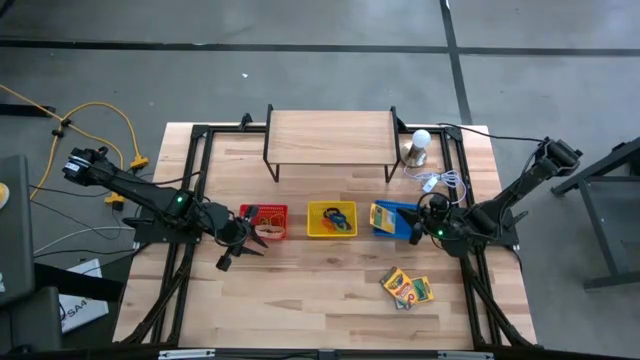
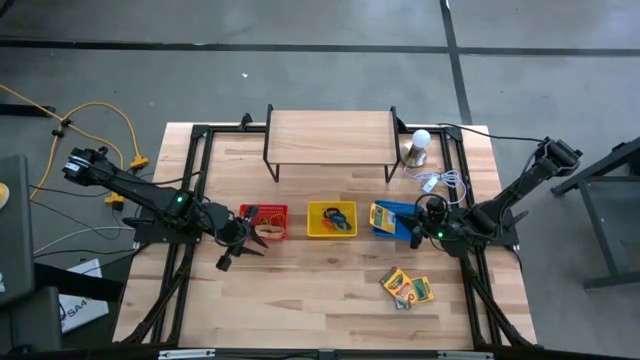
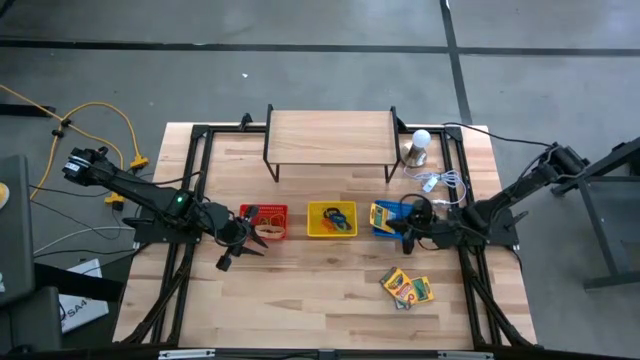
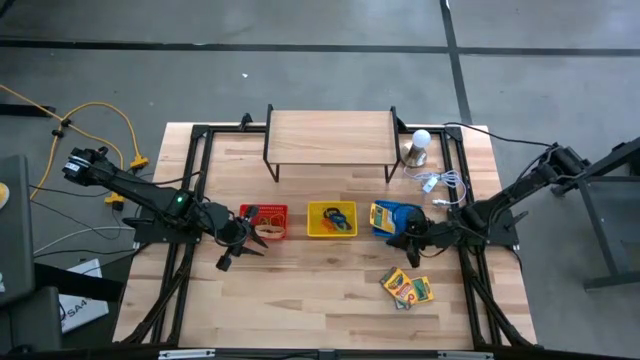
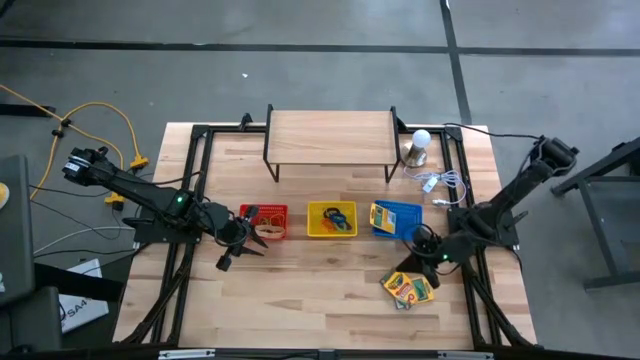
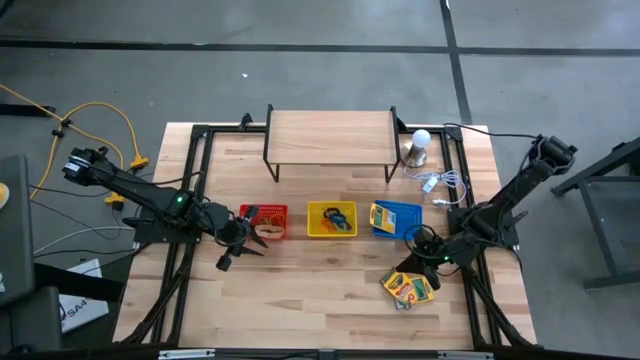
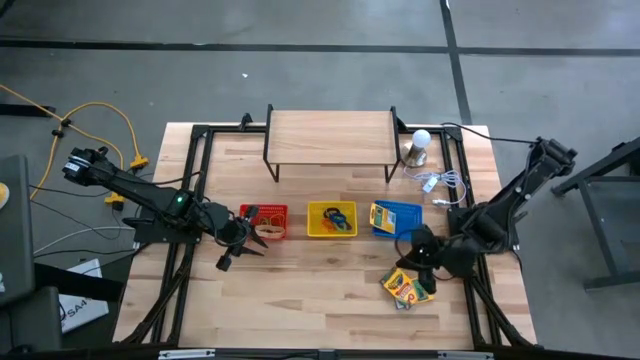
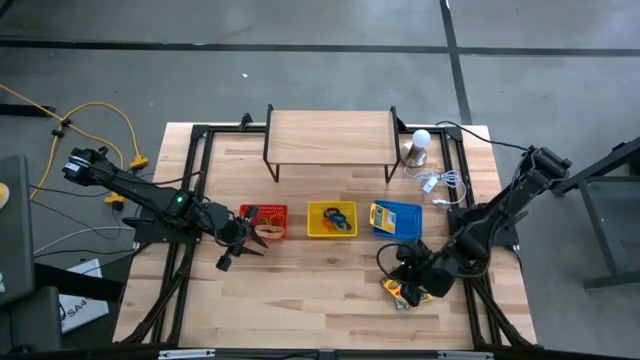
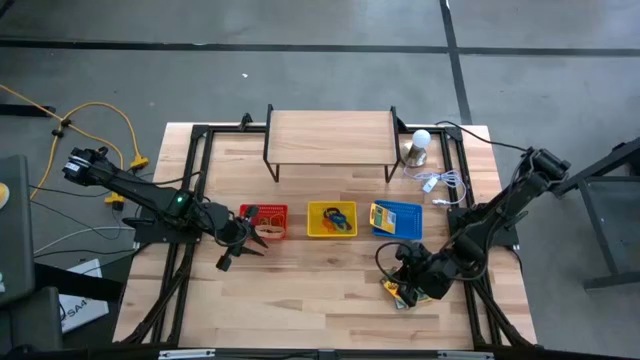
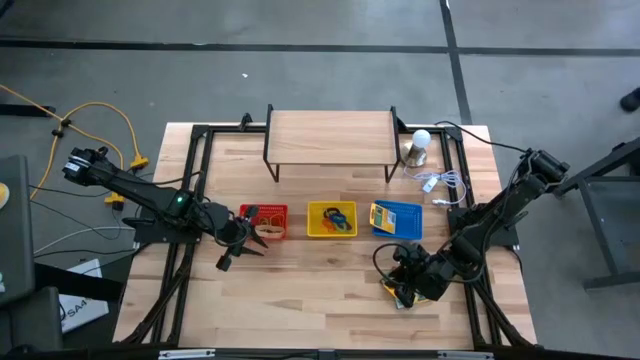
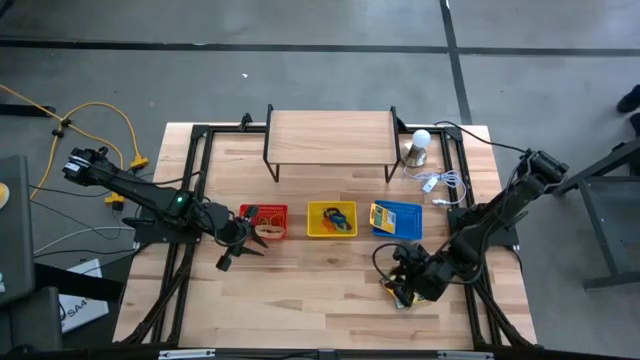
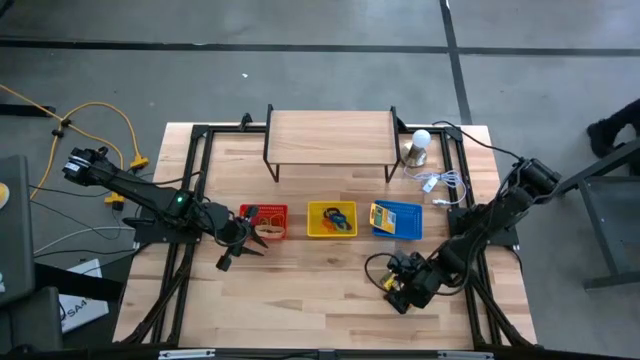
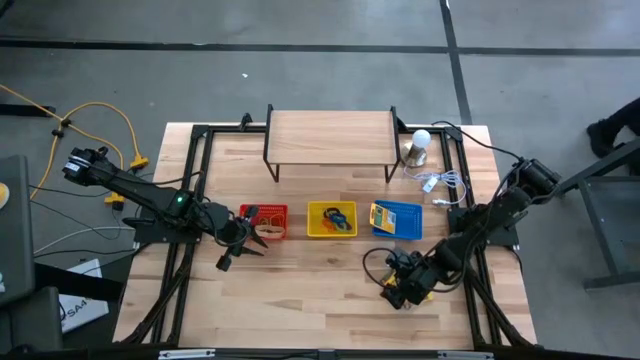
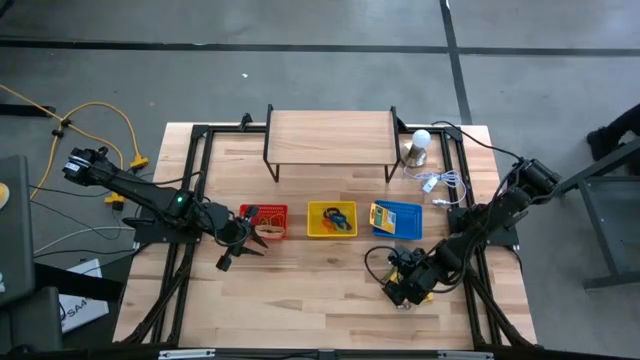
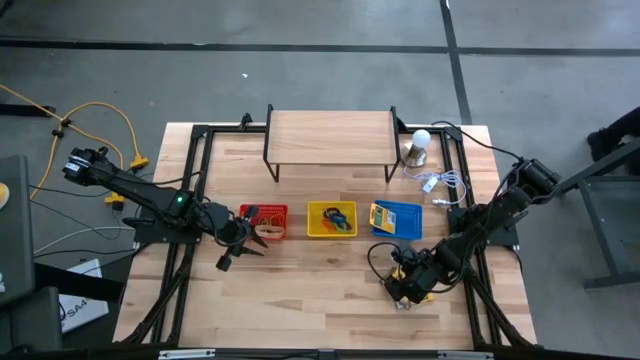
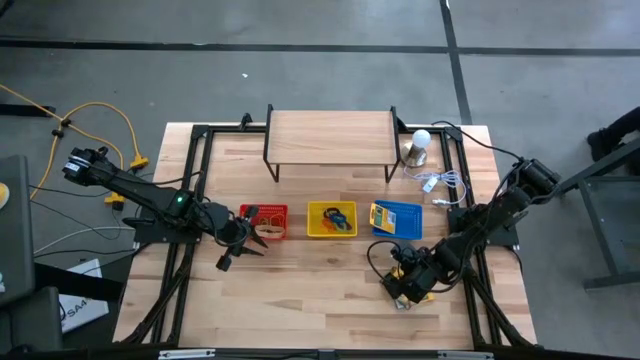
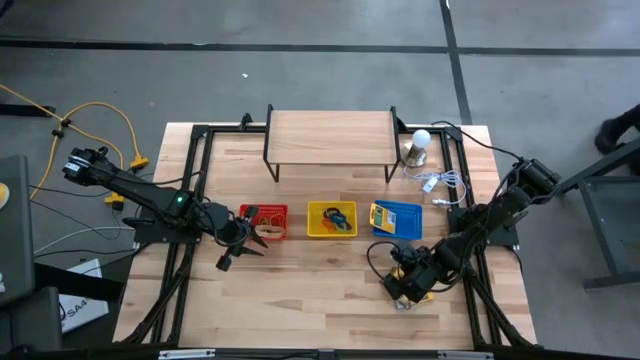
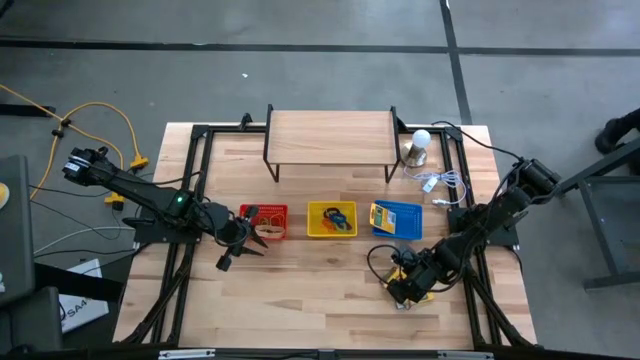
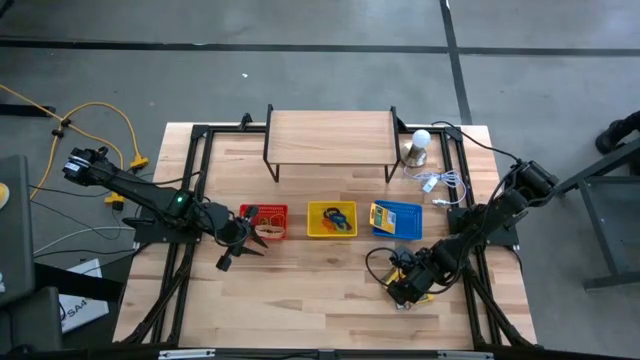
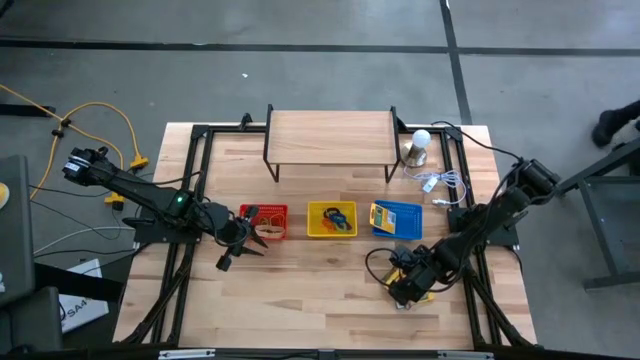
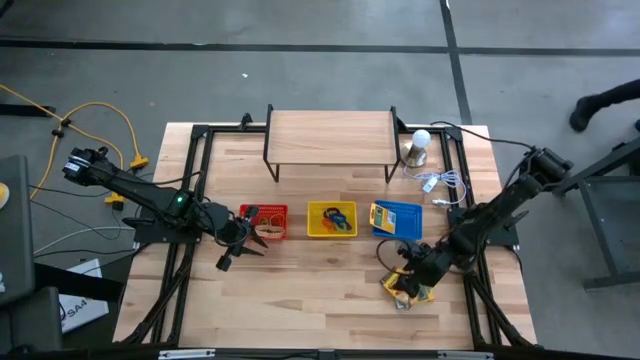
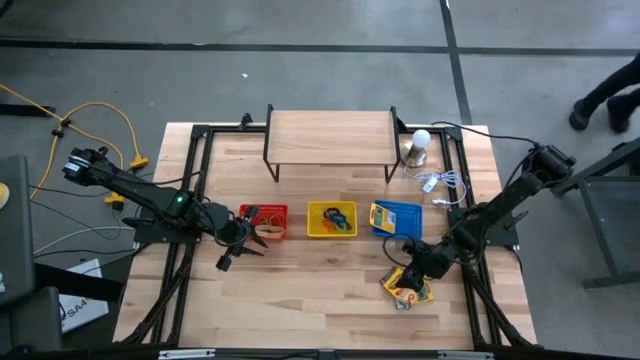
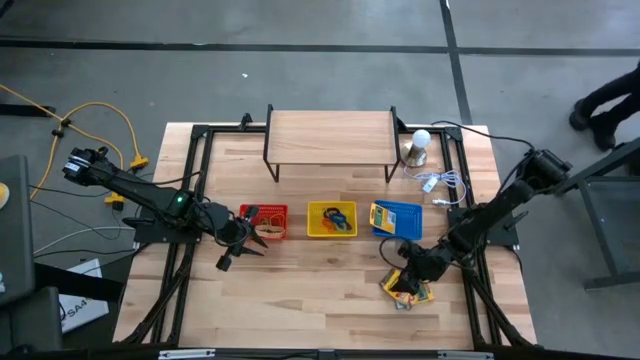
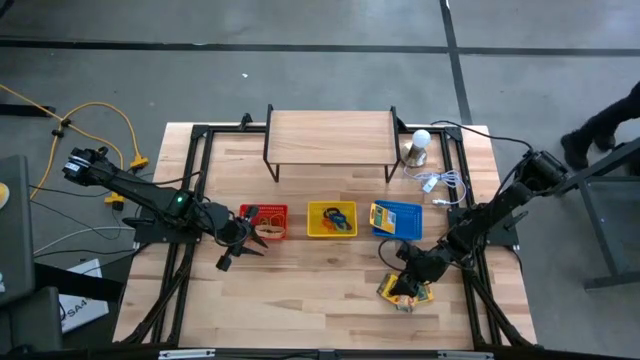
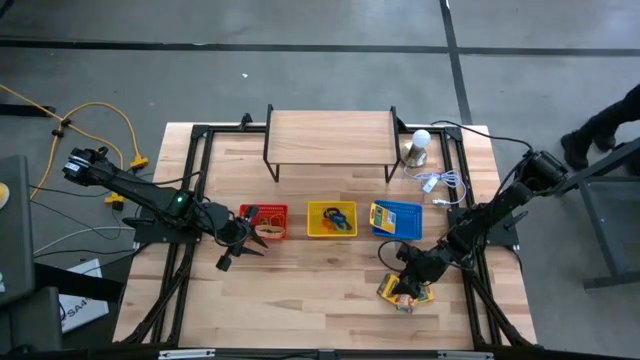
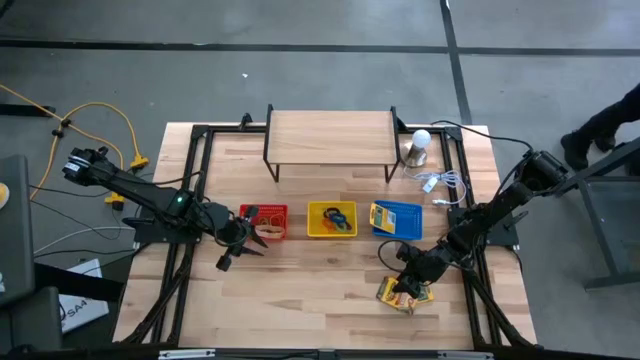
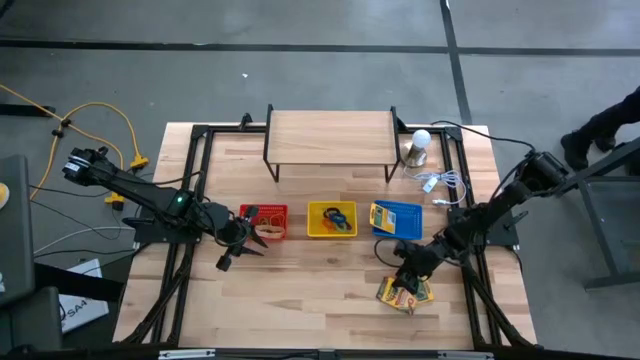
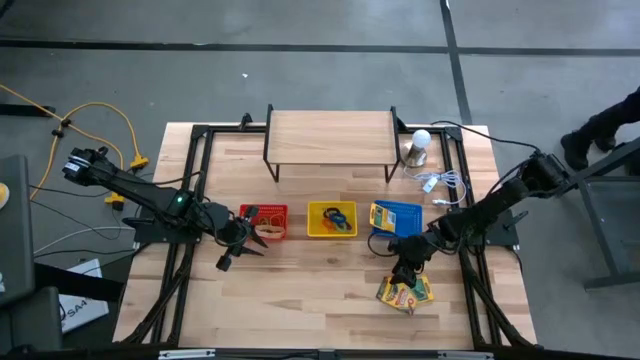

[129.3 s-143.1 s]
Task: Pick & Place Office Desk Supplies
Put the box of crayons into the blue bin

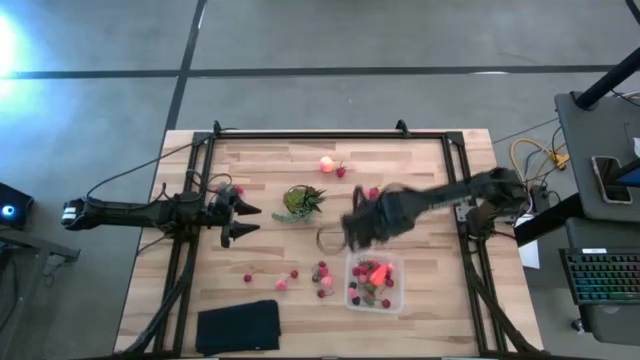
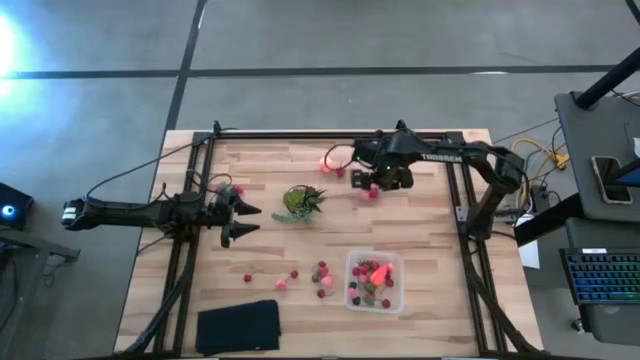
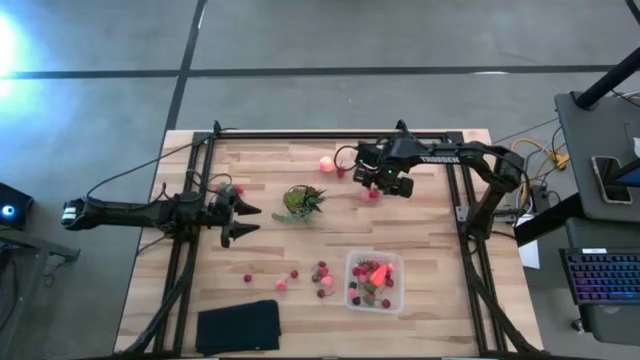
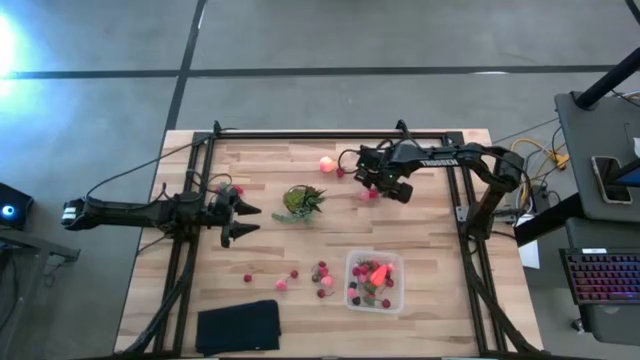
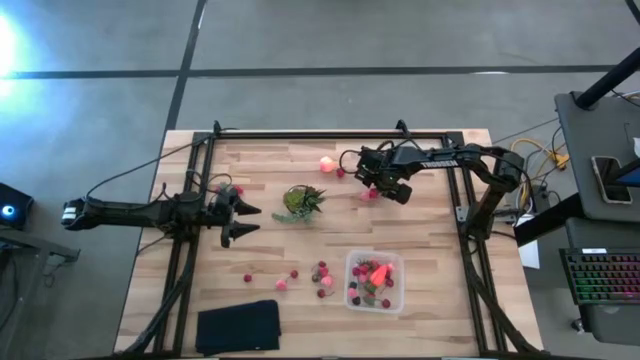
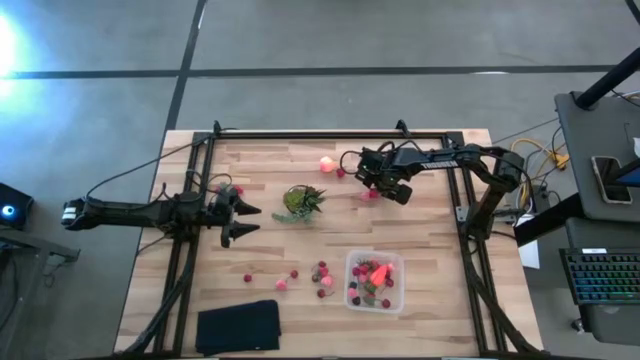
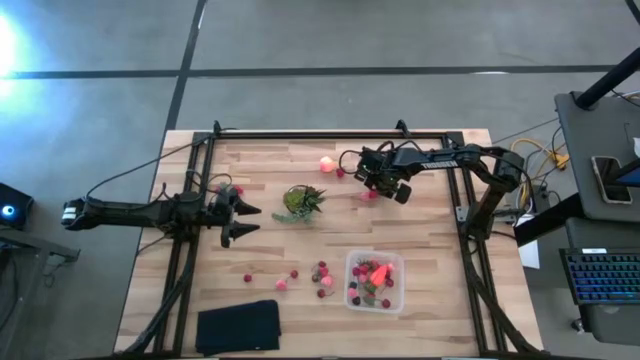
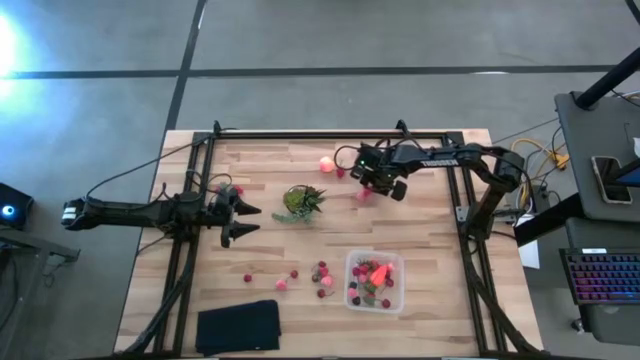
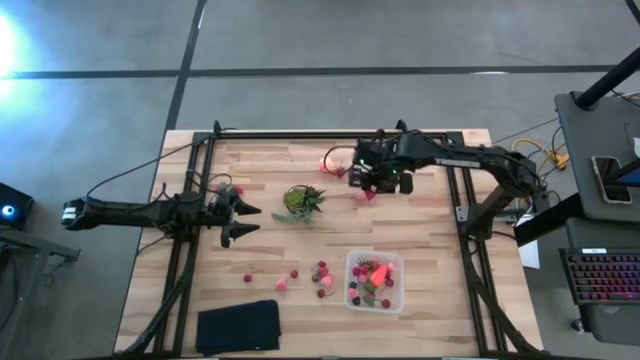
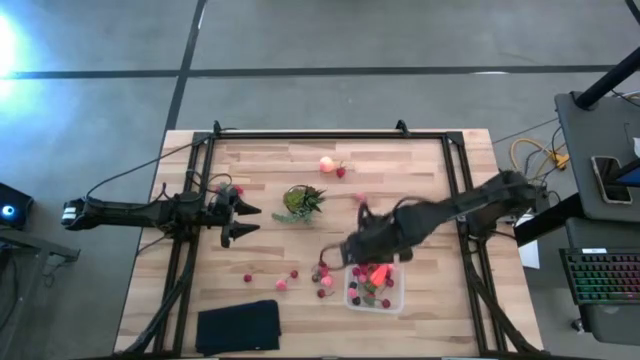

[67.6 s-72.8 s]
Task: Pick and placing Produce into tupperware
Put the strawberry into the bin

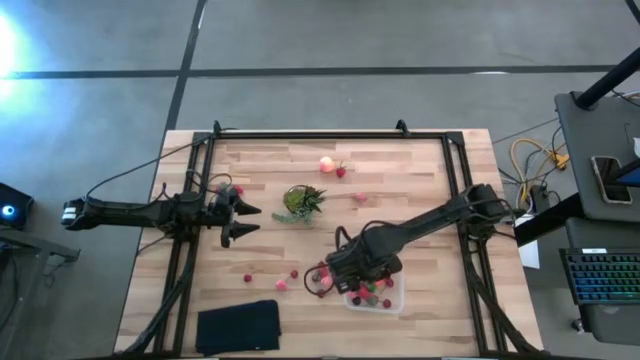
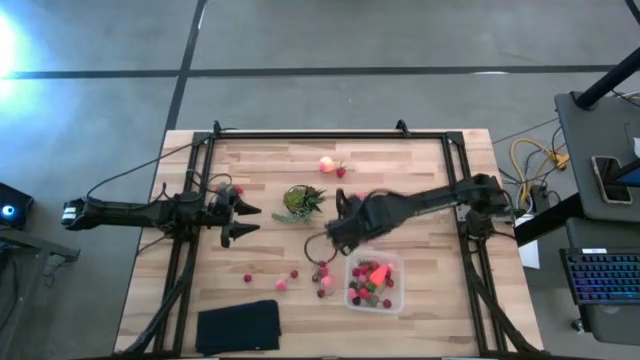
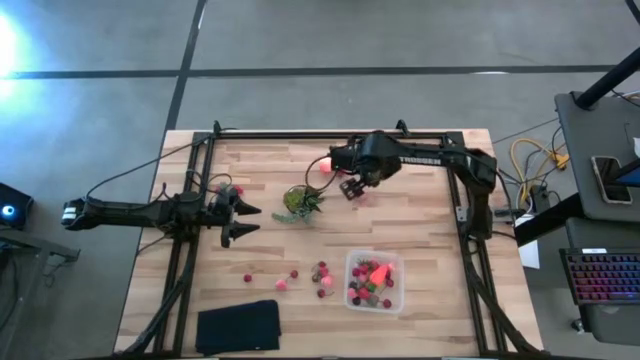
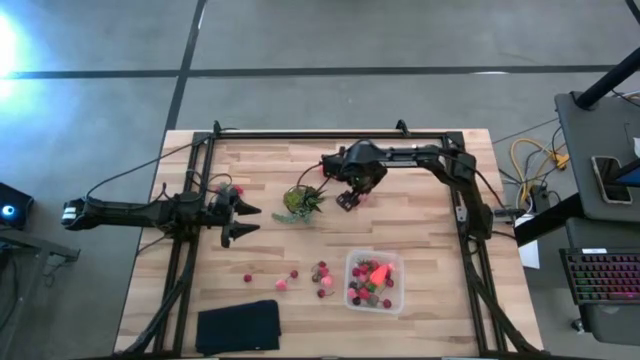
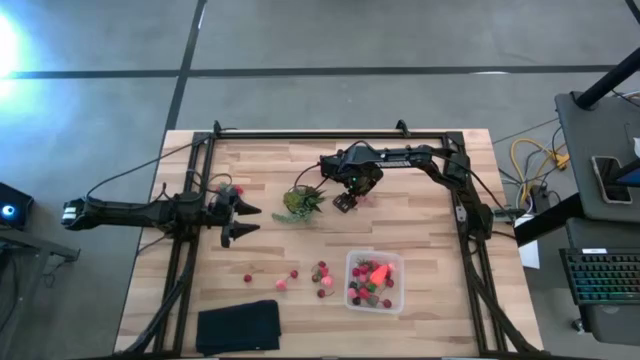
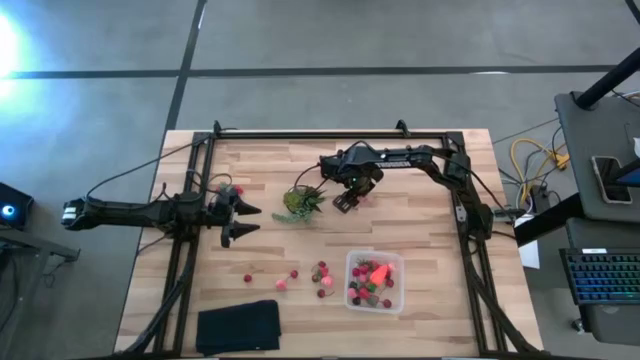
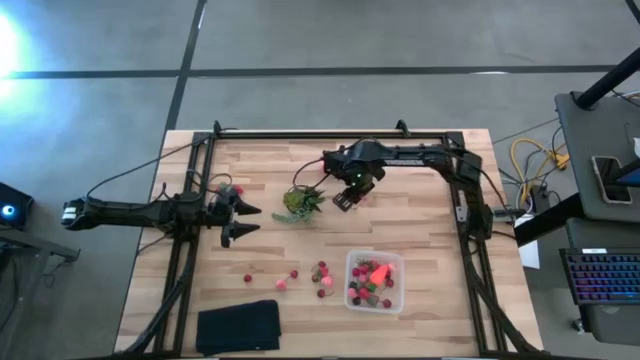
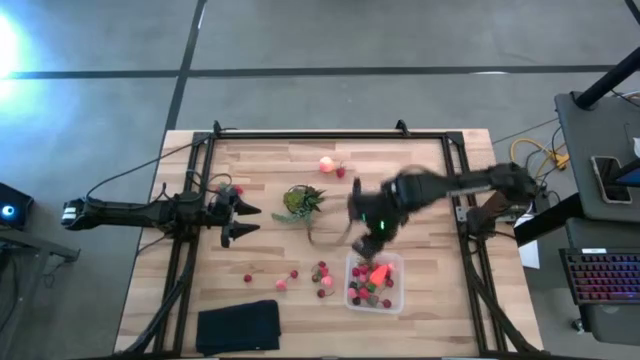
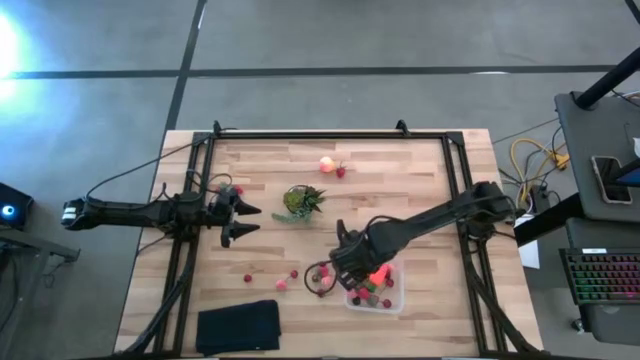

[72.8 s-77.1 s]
Put the top apricot into the bin
